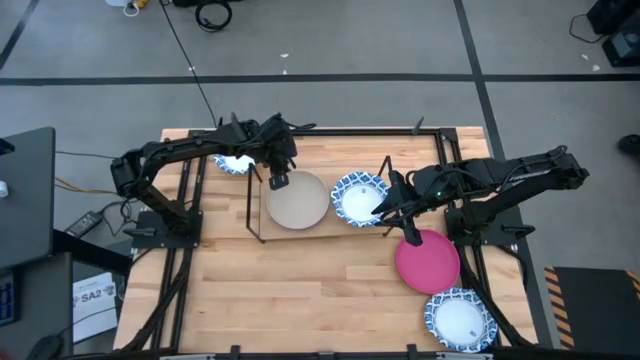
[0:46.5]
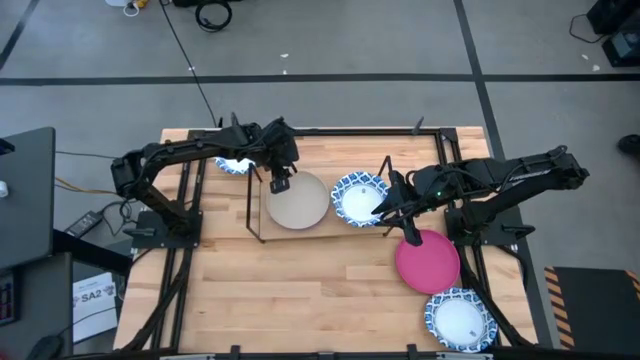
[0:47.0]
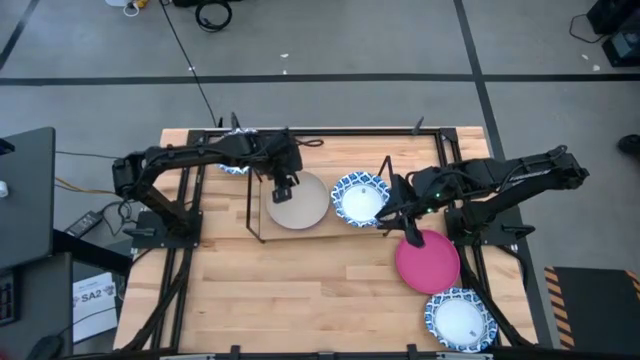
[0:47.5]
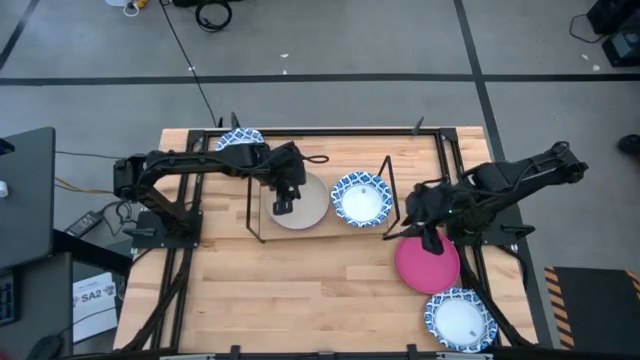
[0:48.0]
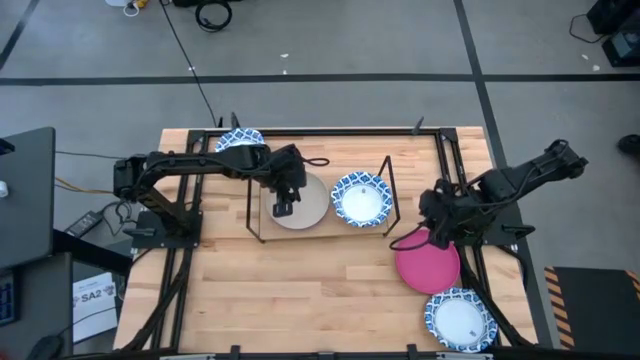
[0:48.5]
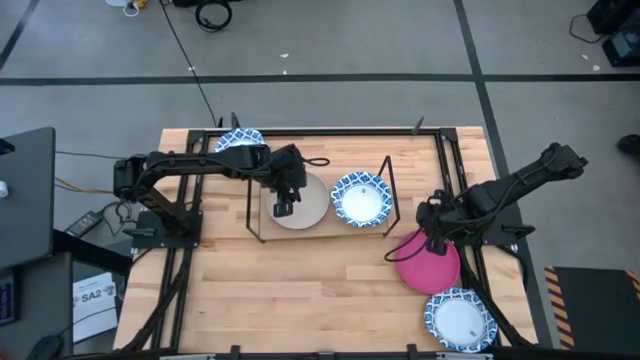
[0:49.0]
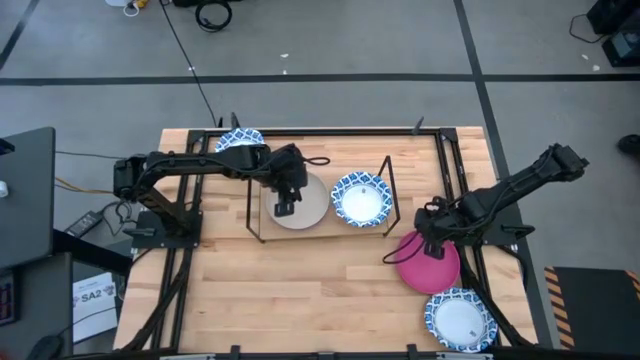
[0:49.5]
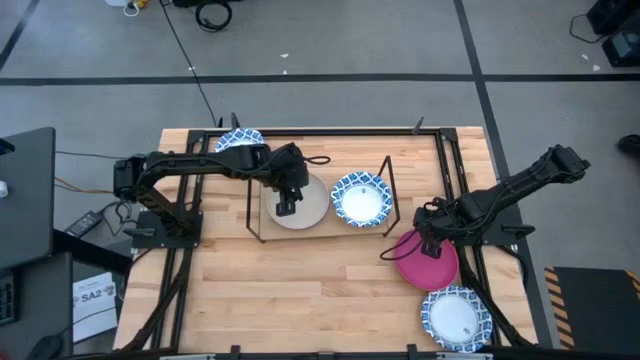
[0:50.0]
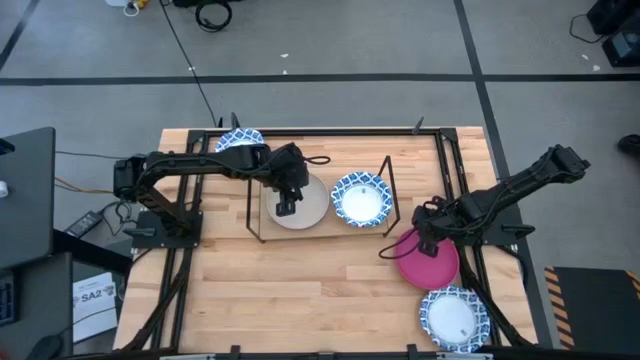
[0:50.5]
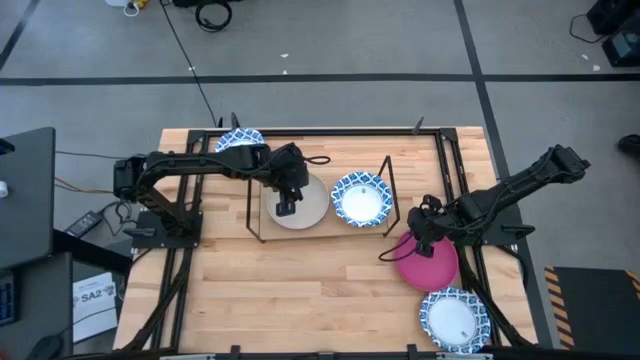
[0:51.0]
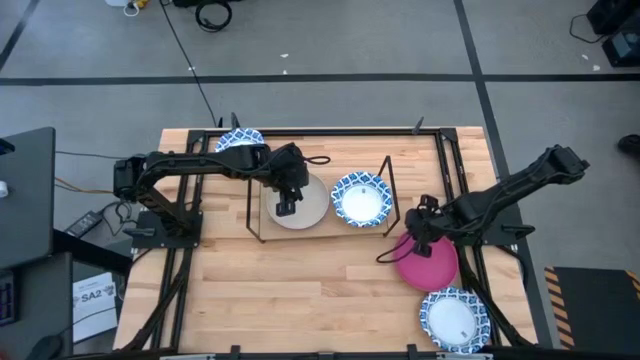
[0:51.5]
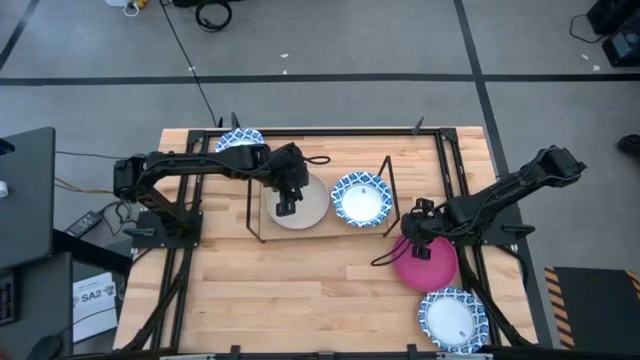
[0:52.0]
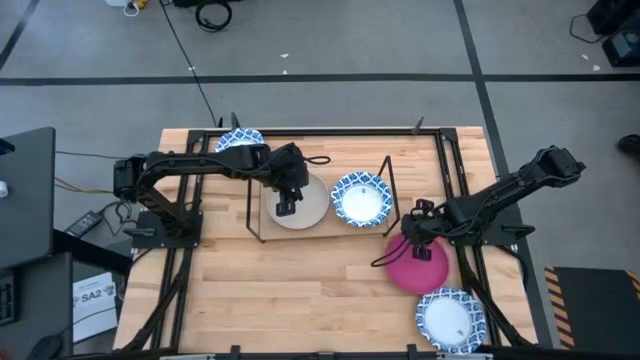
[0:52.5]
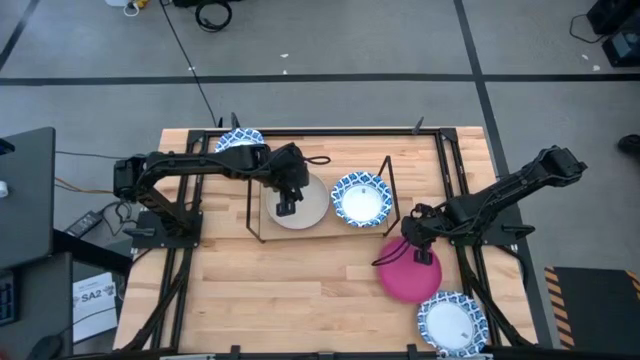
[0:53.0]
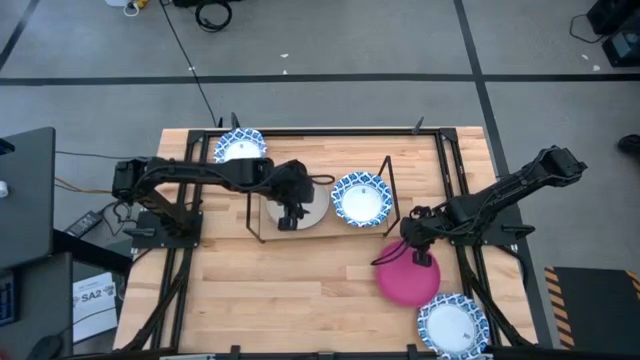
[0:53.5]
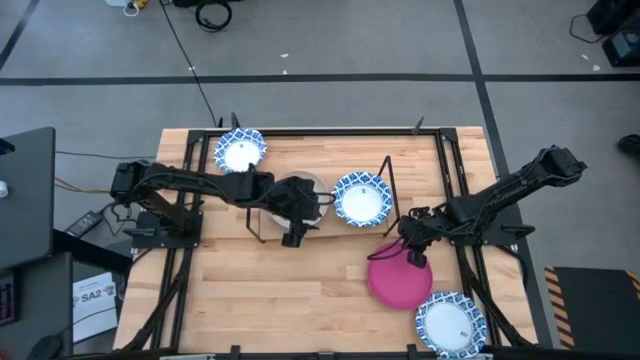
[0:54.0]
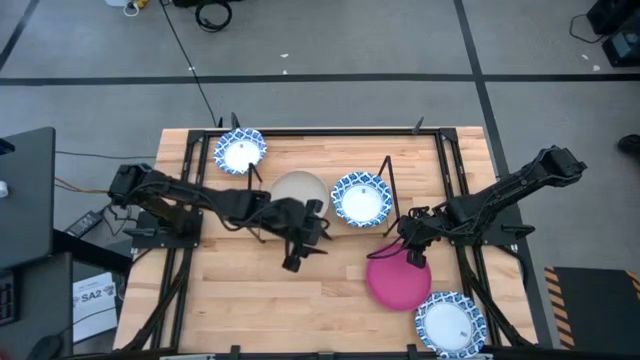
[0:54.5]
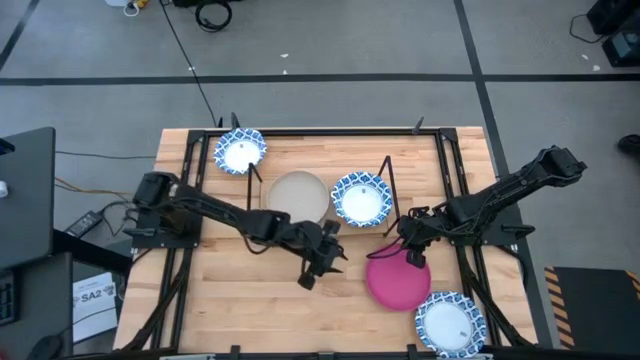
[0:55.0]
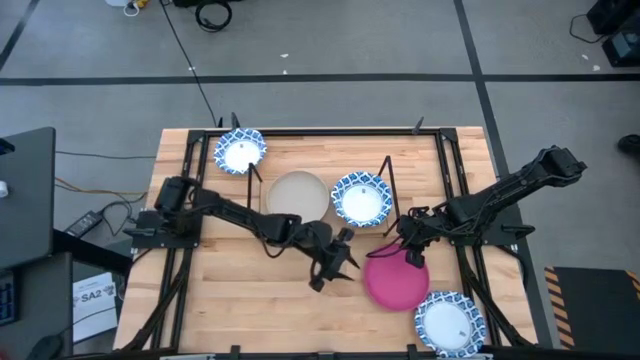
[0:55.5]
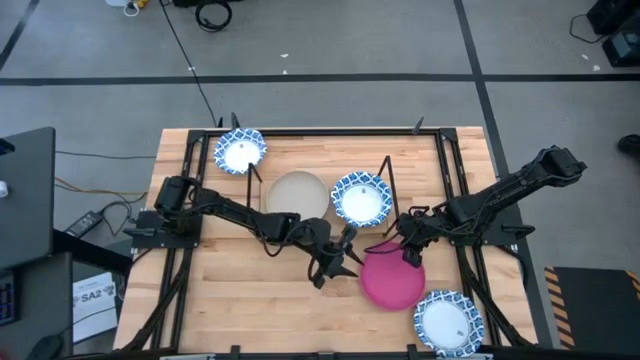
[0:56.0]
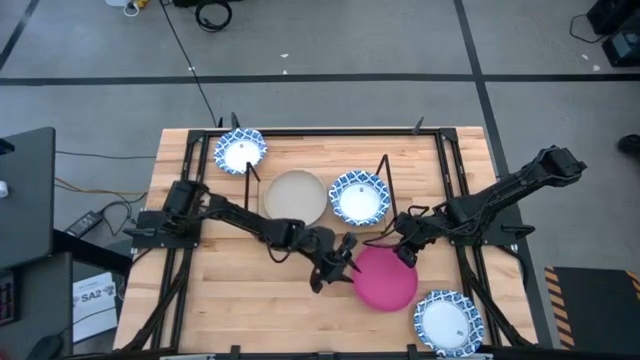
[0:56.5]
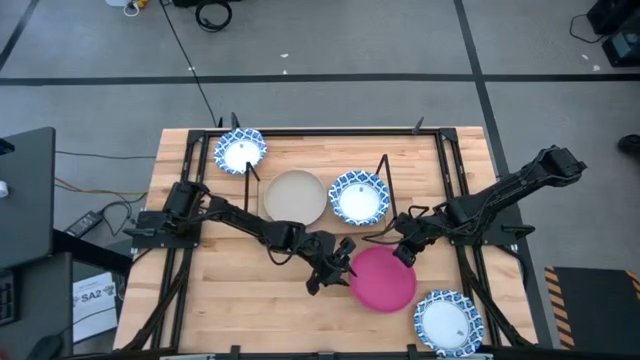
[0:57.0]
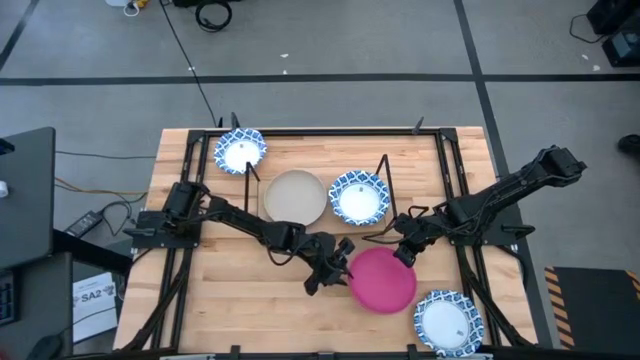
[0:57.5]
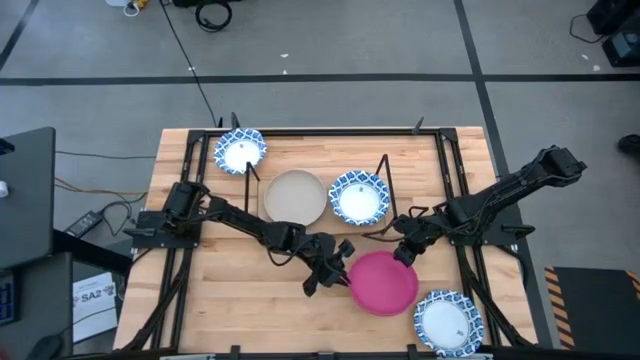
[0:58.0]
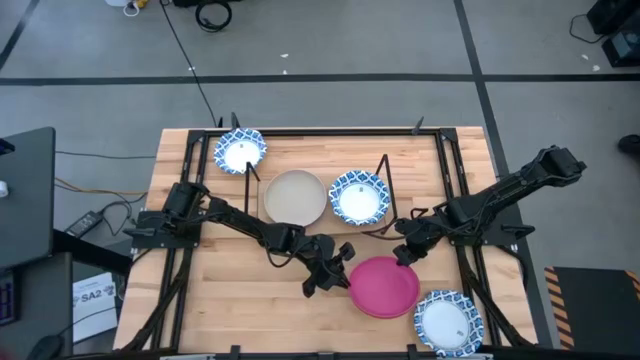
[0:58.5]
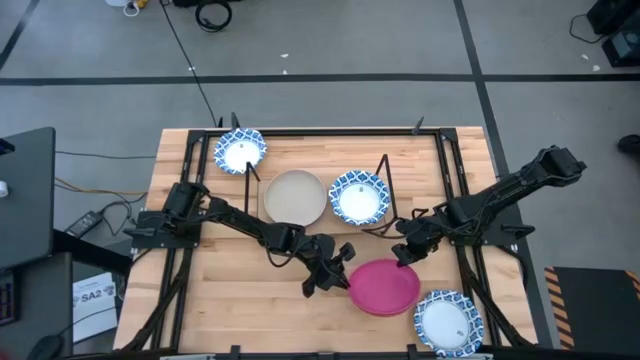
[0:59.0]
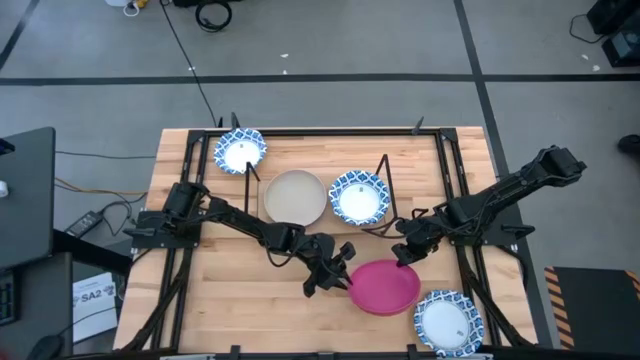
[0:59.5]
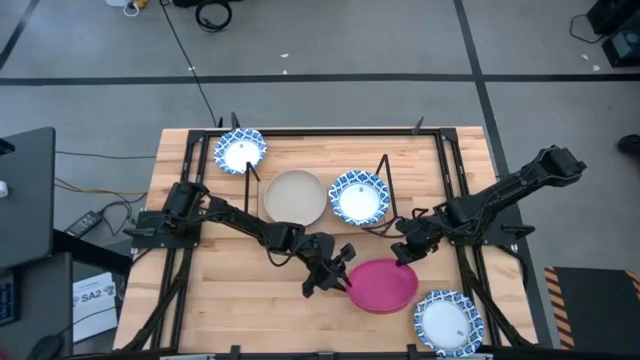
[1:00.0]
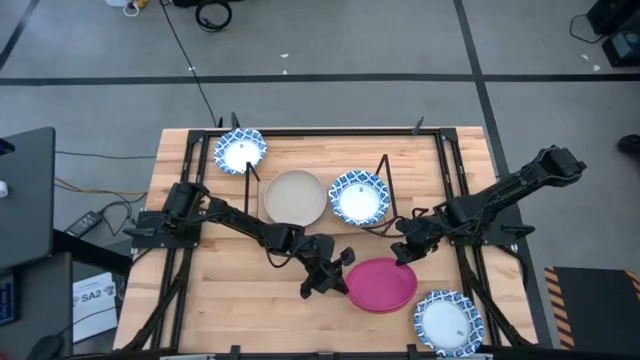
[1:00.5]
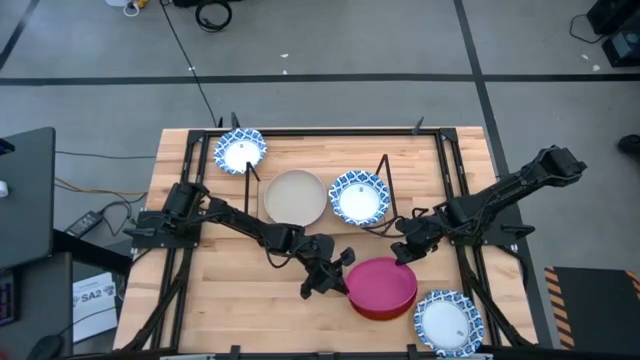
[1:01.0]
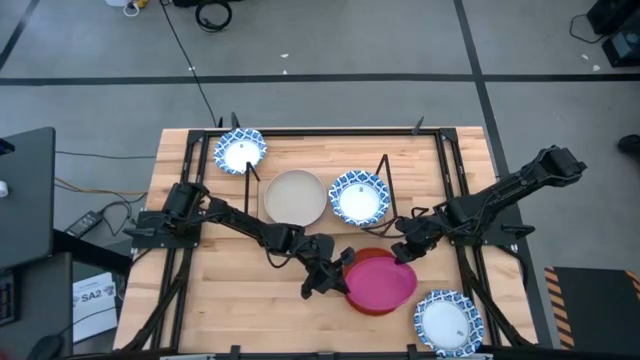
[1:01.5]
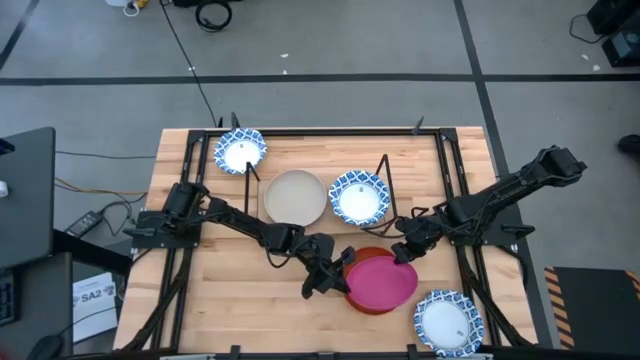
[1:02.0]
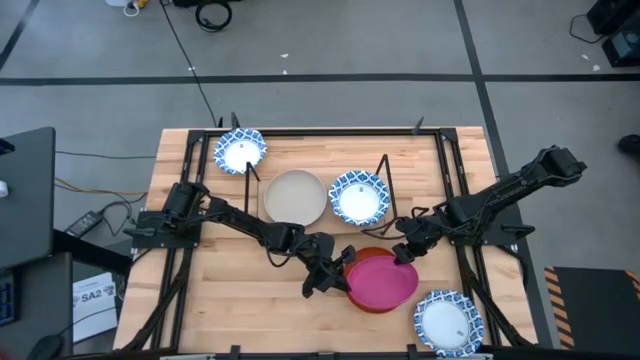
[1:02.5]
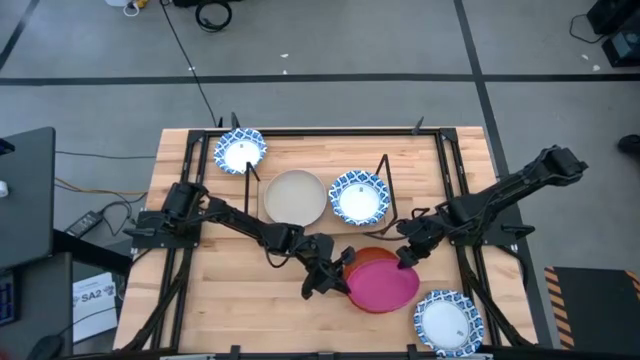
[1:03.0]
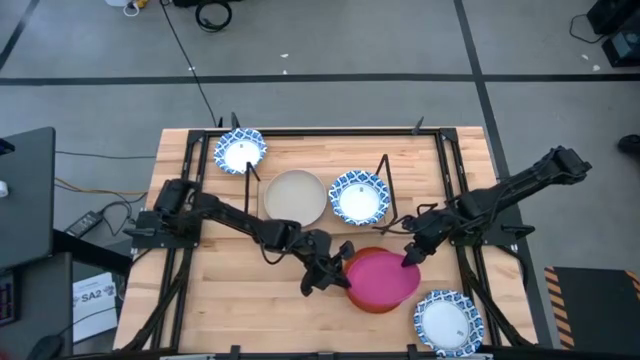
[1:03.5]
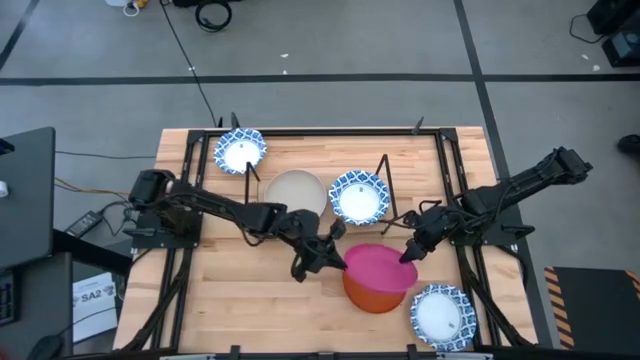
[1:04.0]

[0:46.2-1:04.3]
Task: Place and stack plates onto a shelf
Stack the pink plate on top of the gray plate on the shelf
